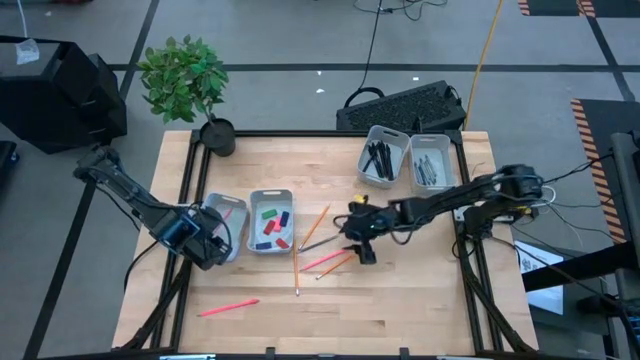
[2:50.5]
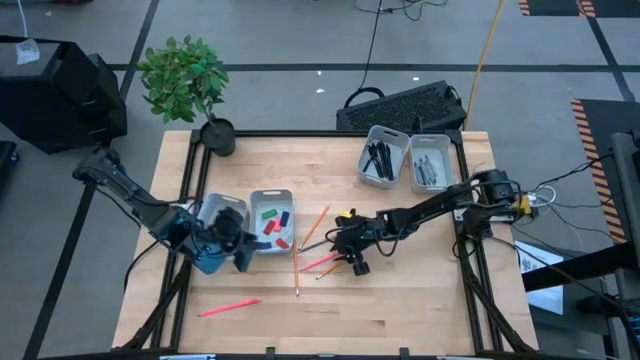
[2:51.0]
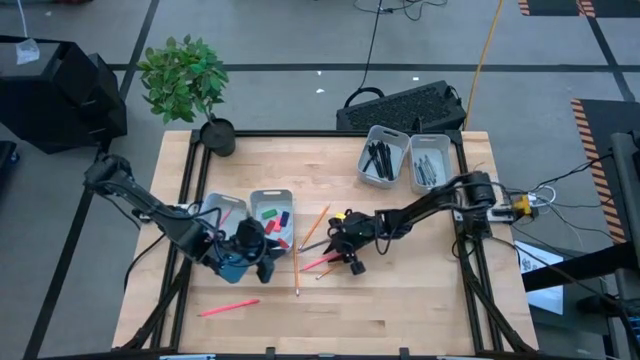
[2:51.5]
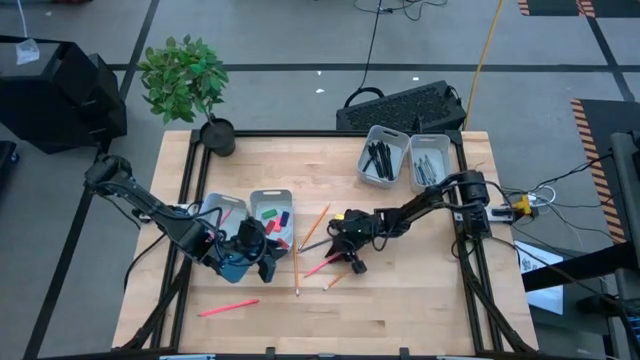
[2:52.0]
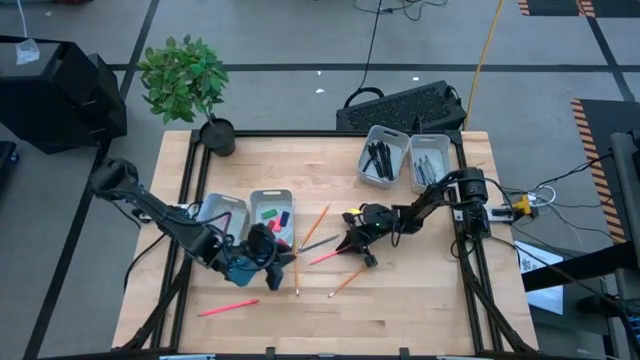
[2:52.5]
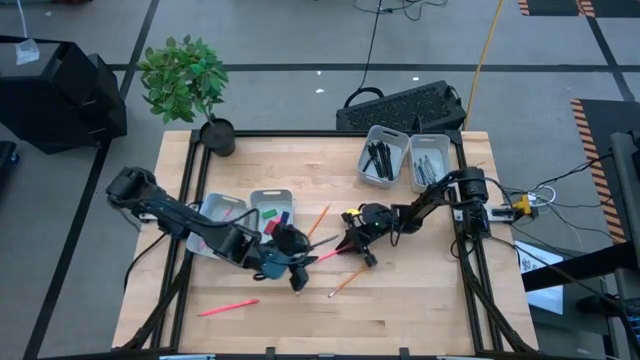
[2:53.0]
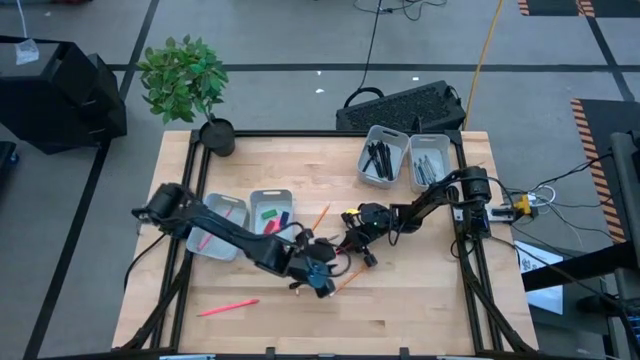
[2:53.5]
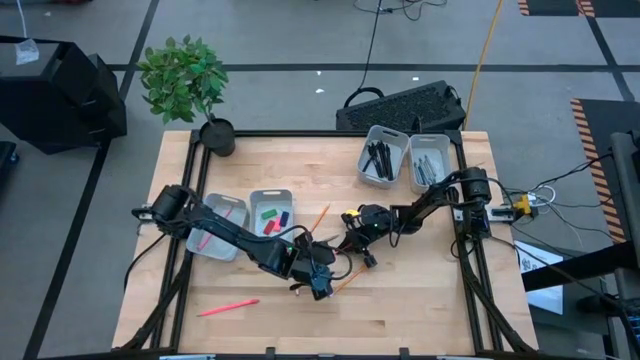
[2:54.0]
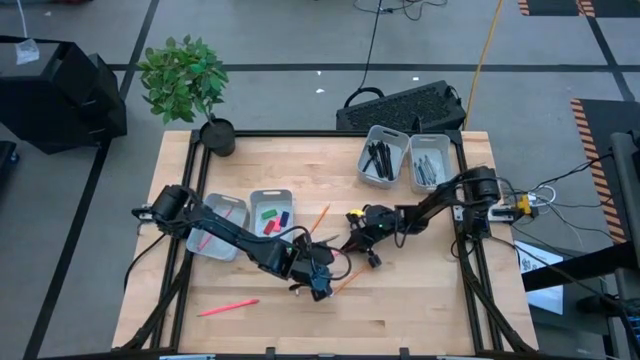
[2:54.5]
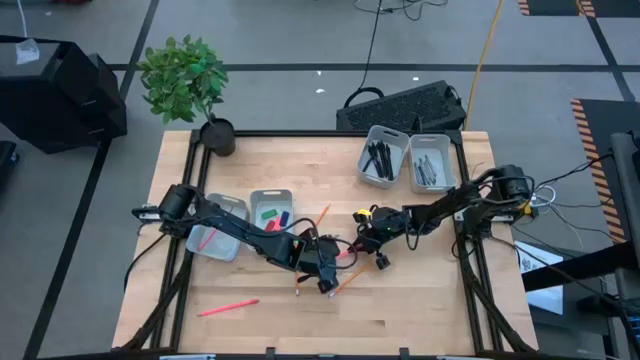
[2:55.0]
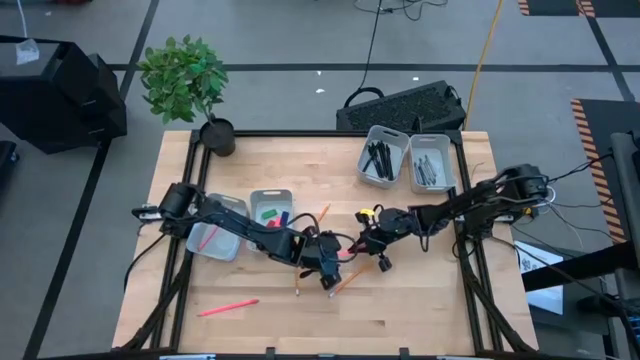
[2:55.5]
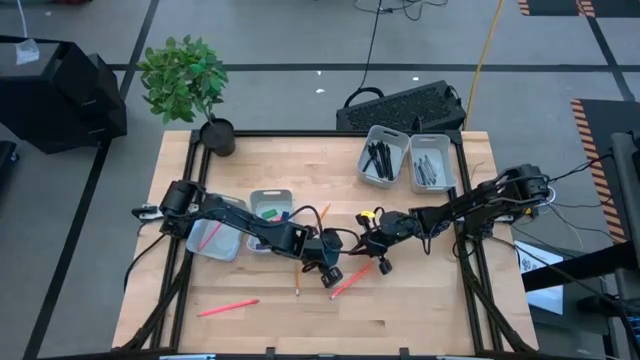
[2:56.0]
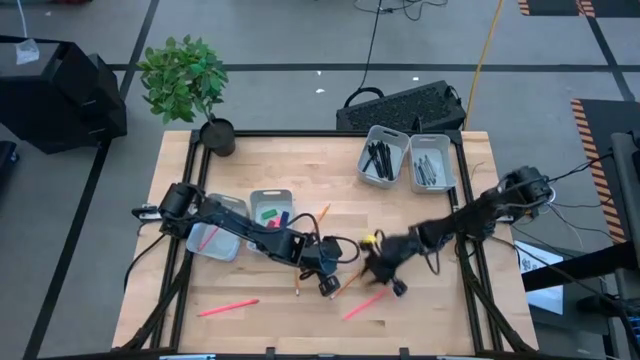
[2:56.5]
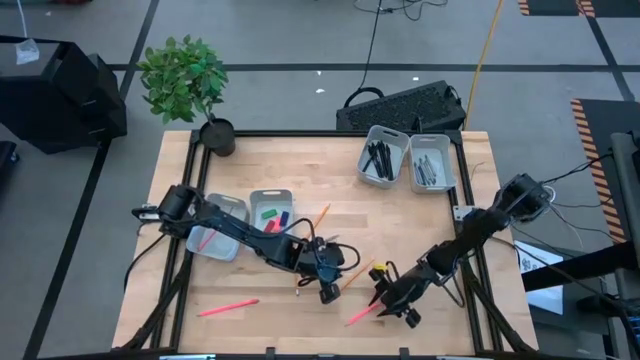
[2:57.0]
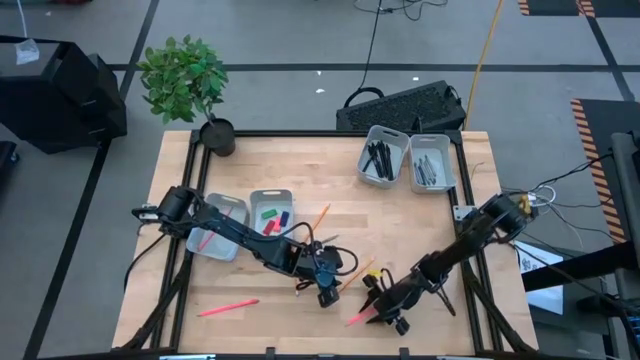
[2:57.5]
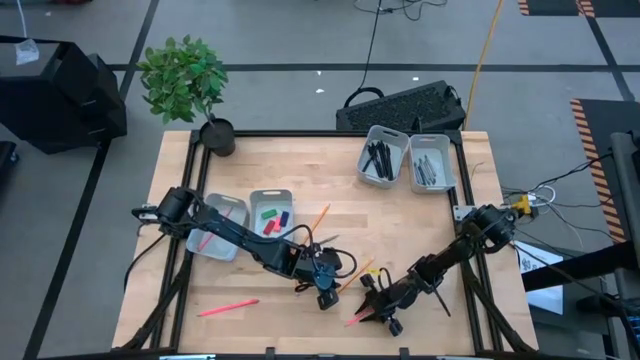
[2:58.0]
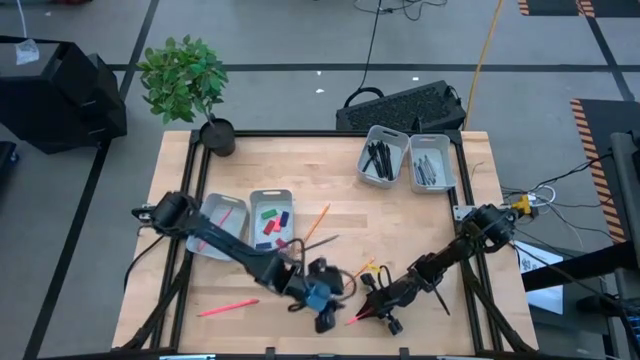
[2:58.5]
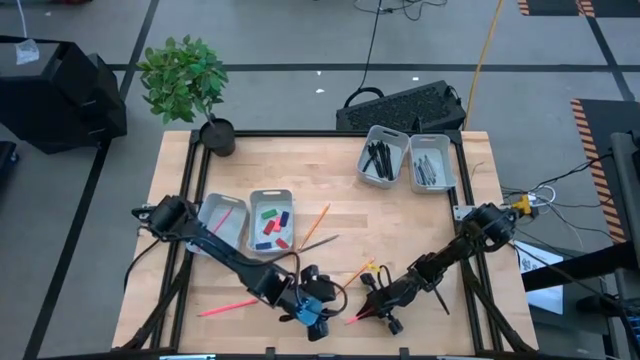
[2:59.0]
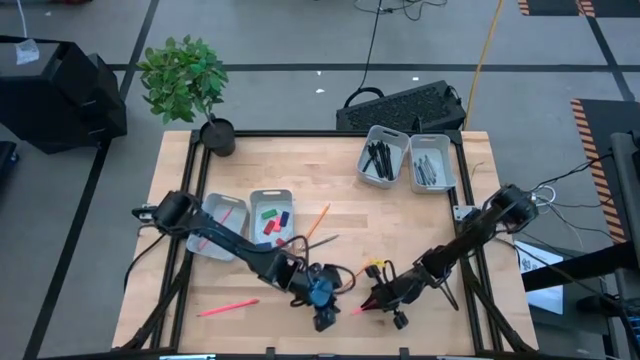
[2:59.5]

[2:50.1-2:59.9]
Task: Sort crayons/erasers/pens/pencils in bins
Put the pink pencil into the bottom left gray bin

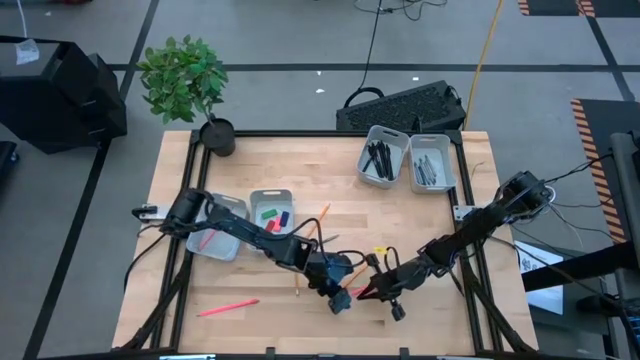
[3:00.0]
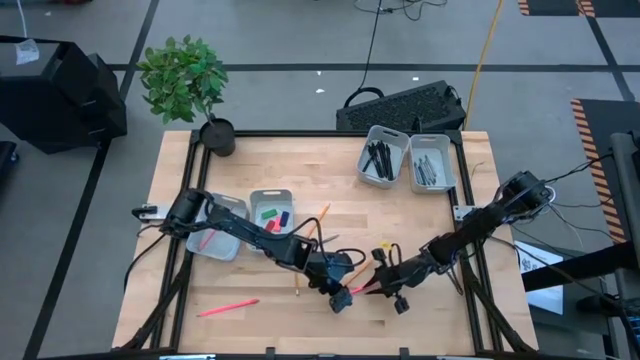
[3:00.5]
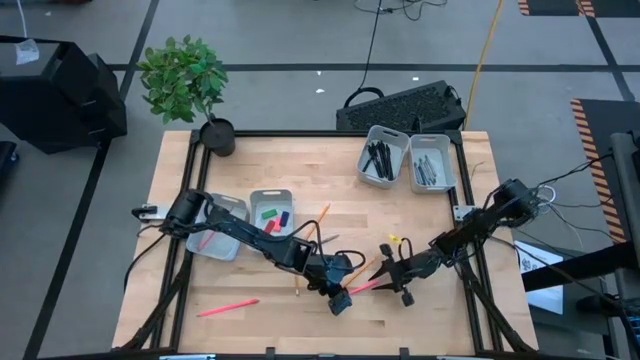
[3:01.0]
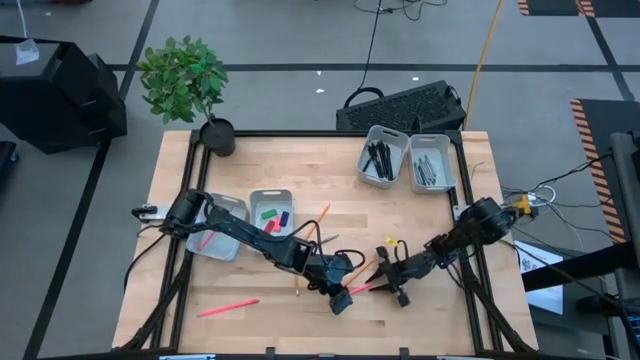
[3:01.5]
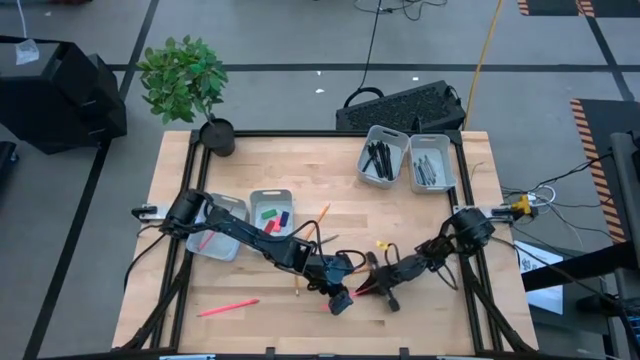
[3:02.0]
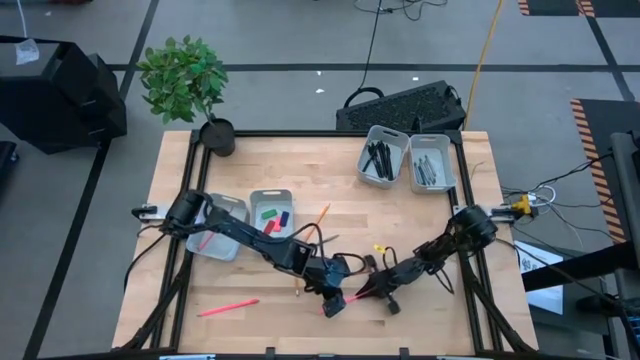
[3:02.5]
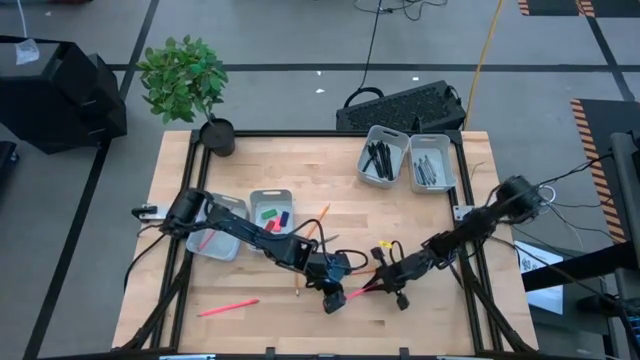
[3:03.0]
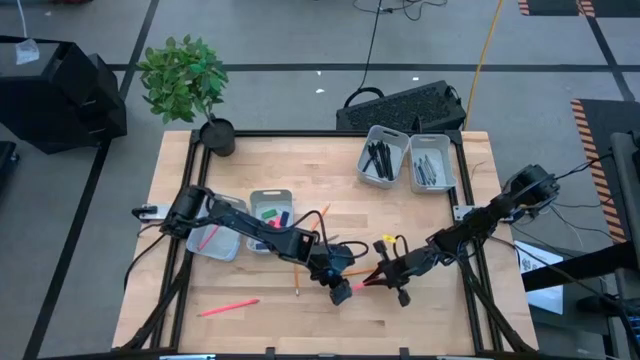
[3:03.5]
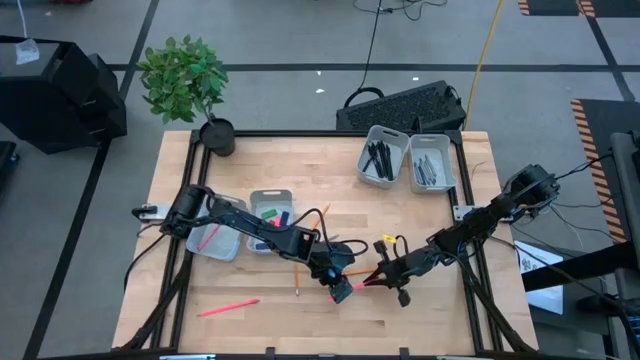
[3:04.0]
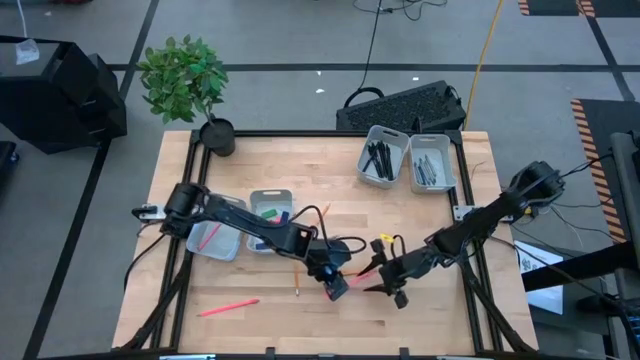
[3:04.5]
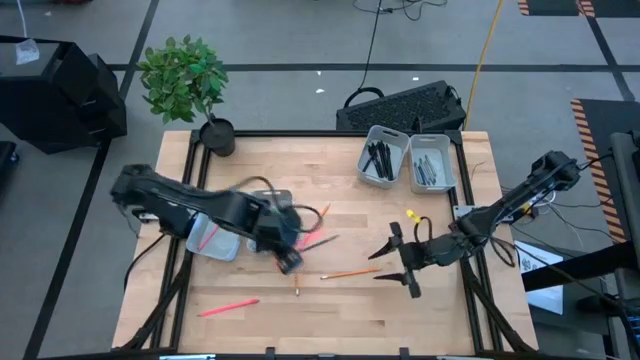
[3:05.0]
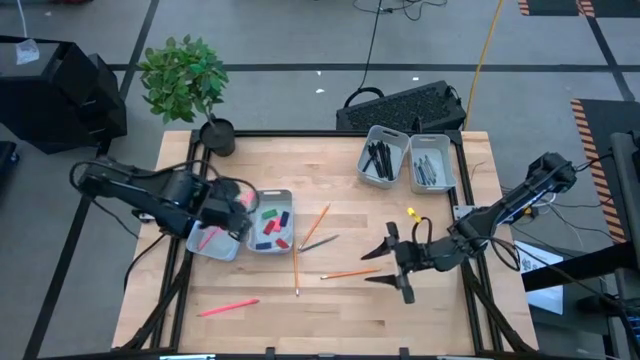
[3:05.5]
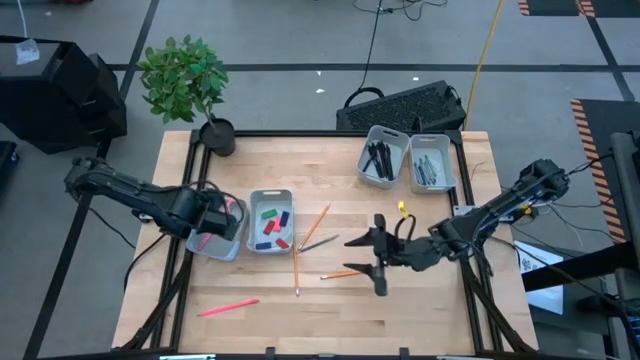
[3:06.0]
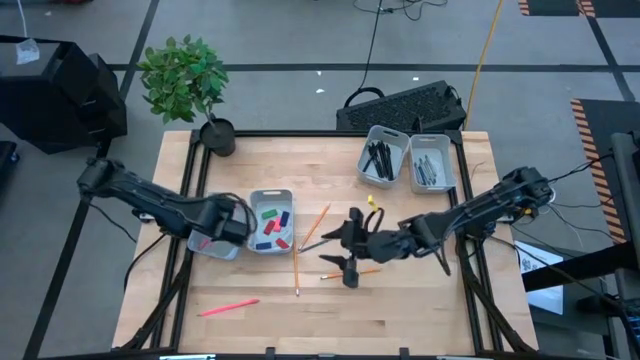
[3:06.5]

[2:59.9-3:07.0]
Put the pink pencil into the bottom left gray bin

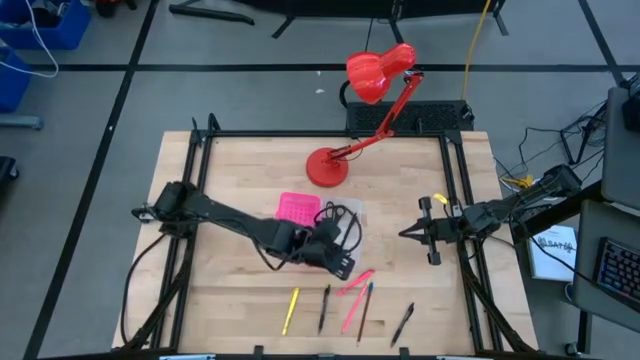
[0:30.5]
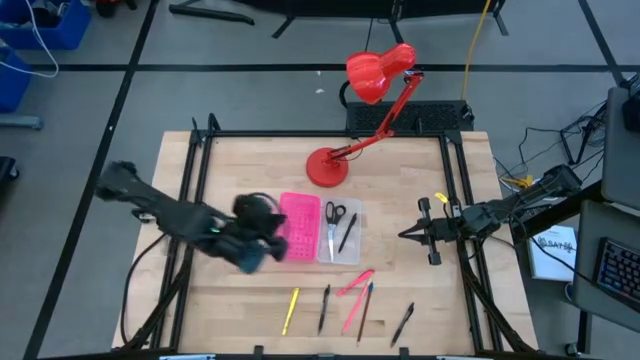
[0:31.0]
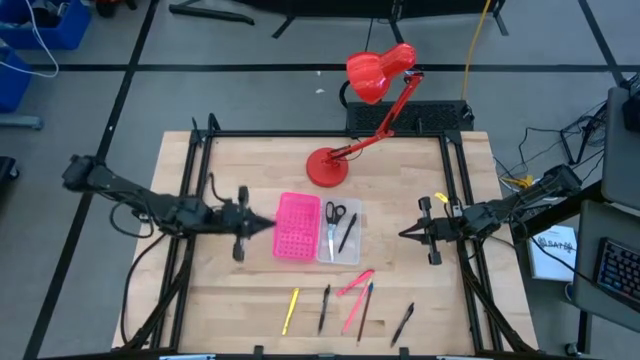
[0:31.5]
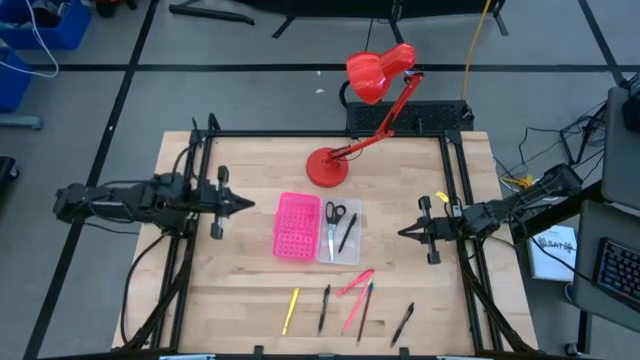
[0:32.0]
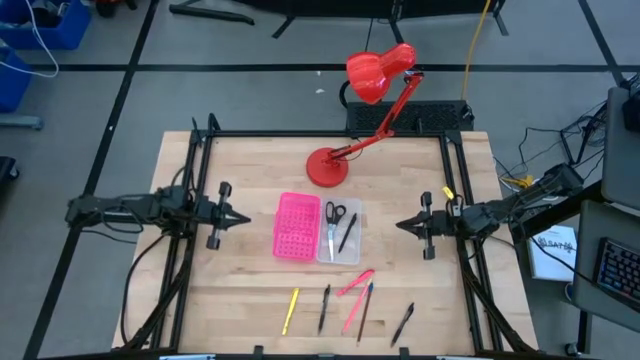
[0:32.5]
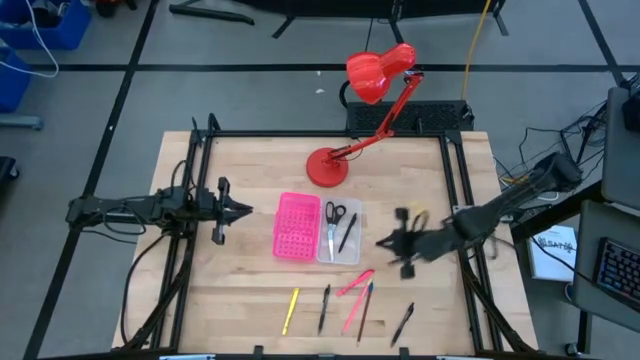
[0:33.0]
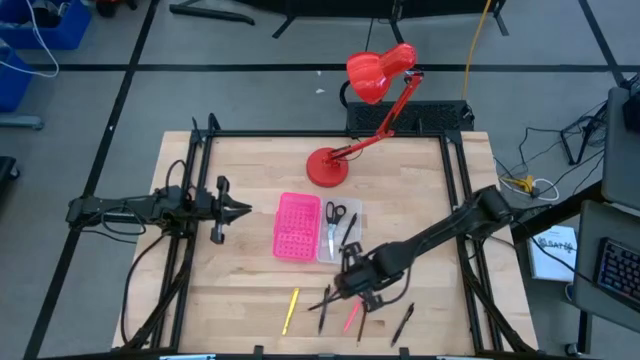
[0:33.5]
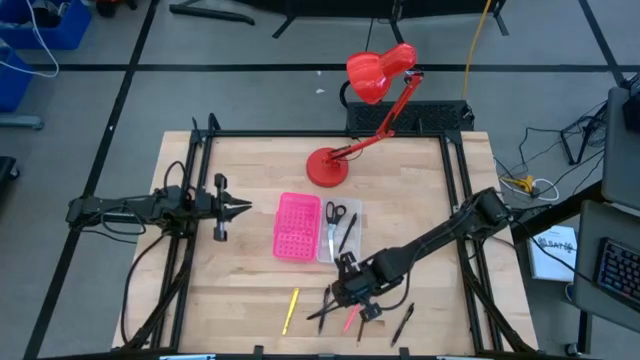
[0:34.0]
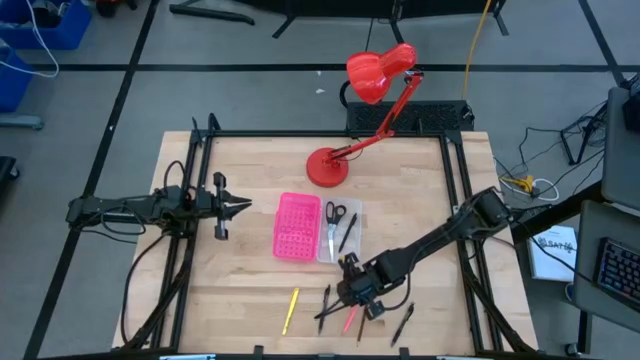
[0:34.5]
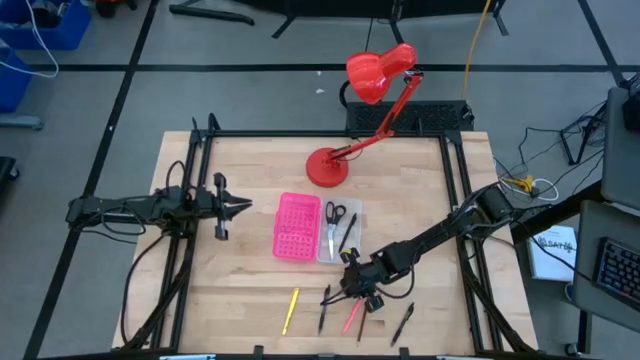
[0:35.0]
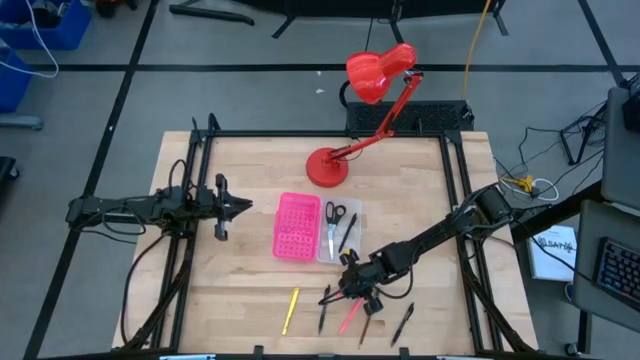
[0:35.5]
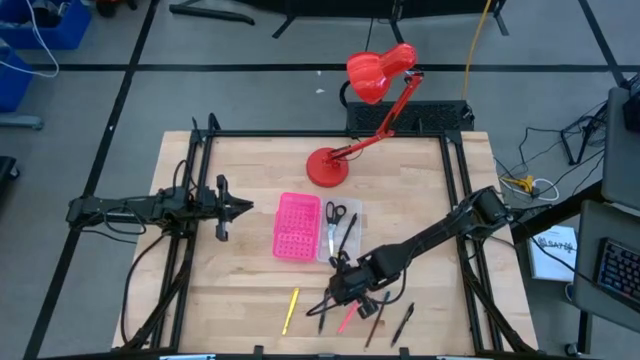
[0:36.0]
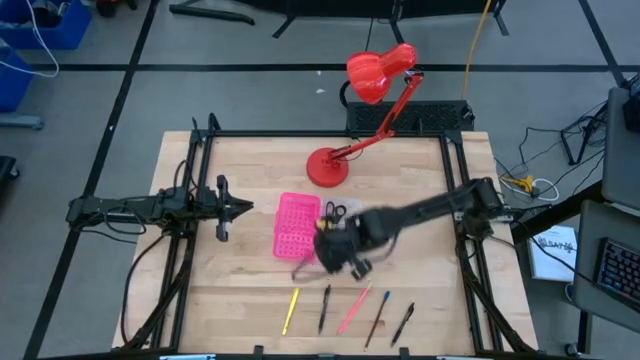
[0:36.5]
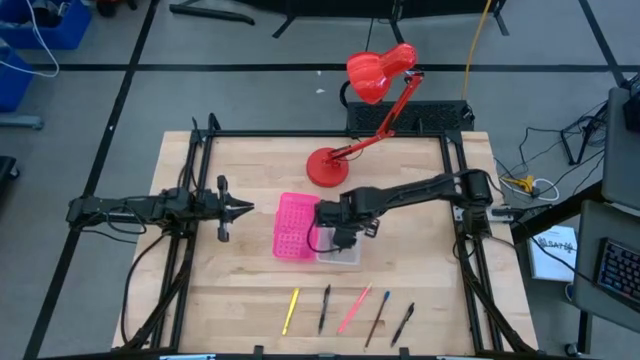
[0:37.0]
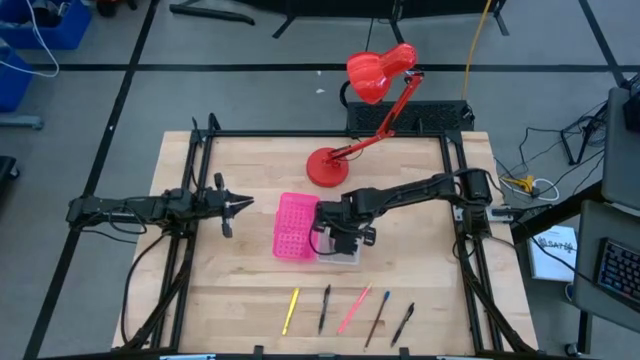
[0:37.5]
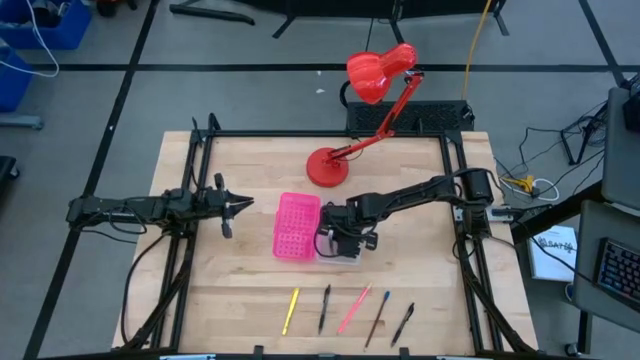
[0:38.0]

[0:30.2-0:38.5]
Task: Pick & place school supplies into a supply box
Put the pink pen into the pink supply box
